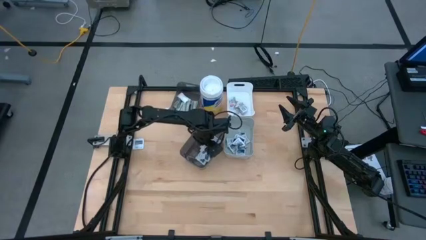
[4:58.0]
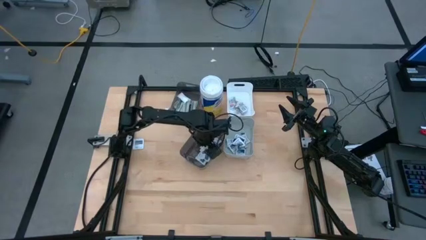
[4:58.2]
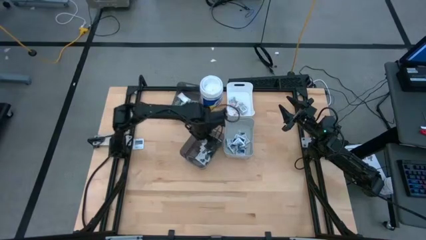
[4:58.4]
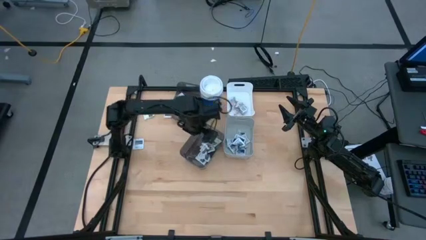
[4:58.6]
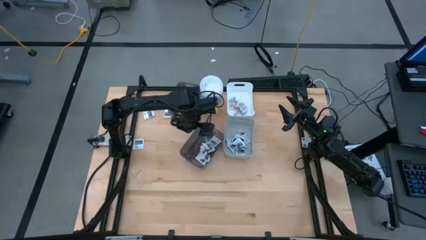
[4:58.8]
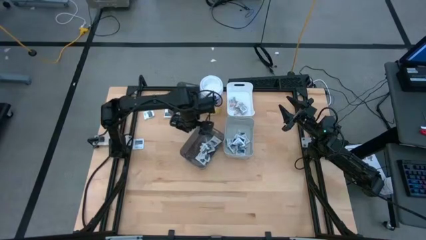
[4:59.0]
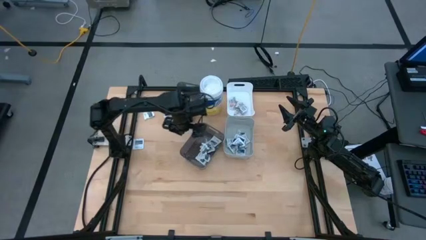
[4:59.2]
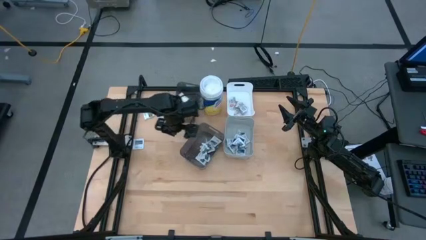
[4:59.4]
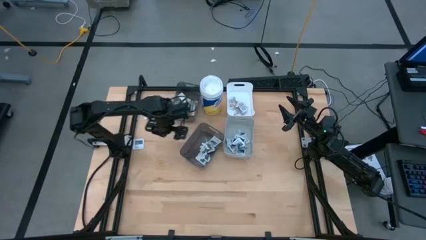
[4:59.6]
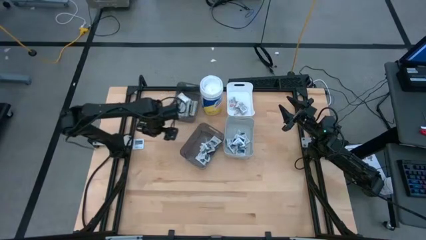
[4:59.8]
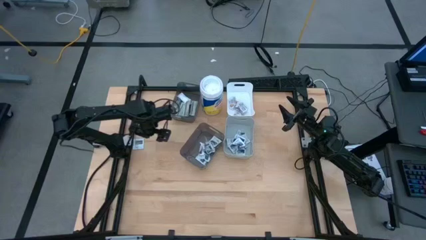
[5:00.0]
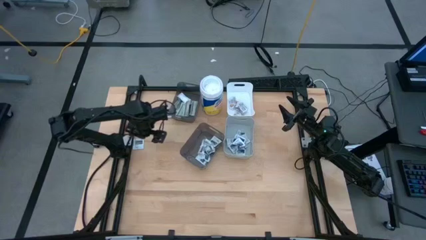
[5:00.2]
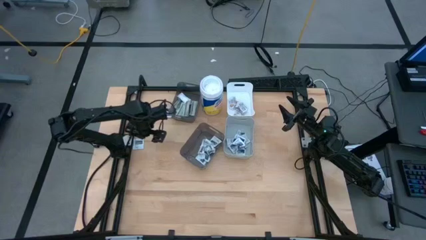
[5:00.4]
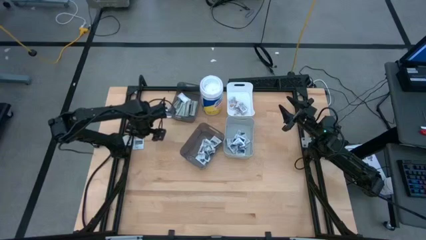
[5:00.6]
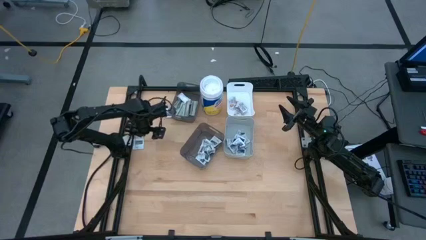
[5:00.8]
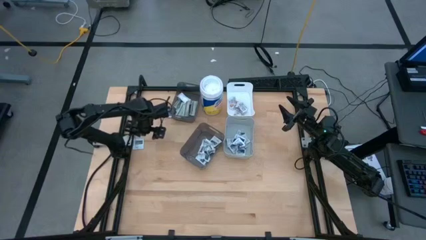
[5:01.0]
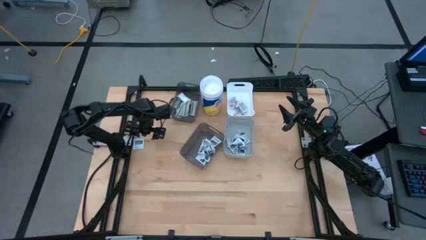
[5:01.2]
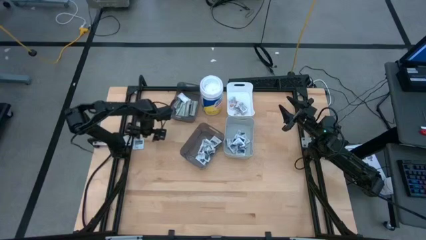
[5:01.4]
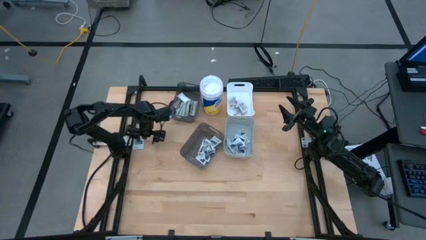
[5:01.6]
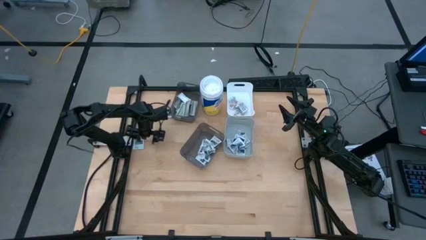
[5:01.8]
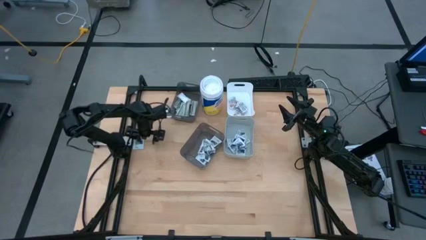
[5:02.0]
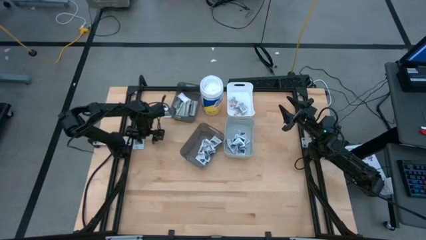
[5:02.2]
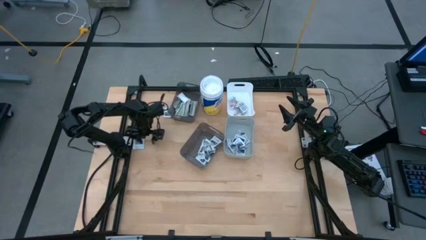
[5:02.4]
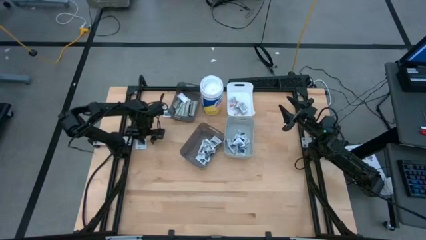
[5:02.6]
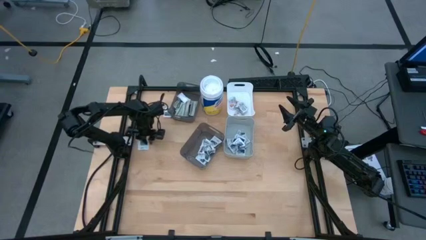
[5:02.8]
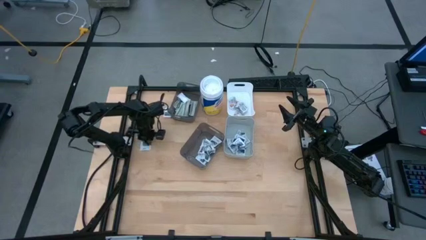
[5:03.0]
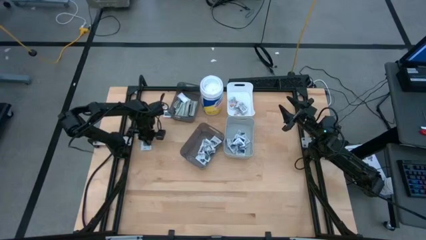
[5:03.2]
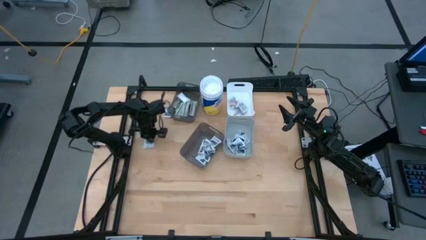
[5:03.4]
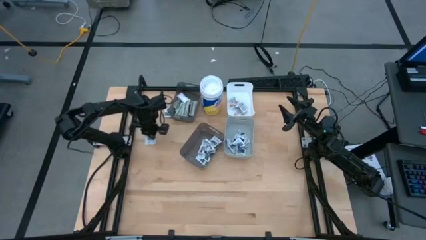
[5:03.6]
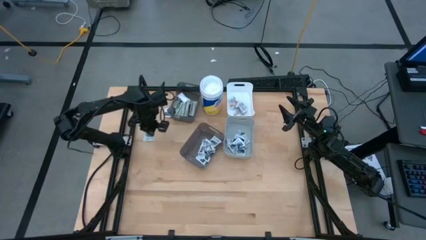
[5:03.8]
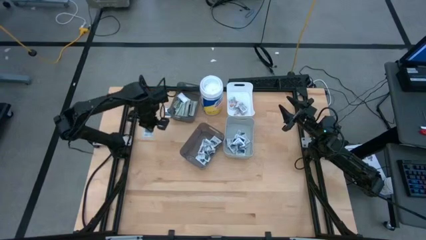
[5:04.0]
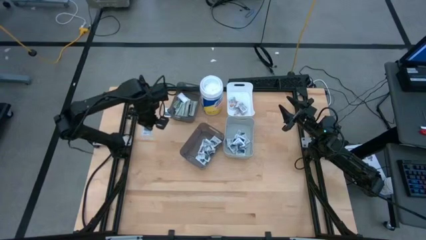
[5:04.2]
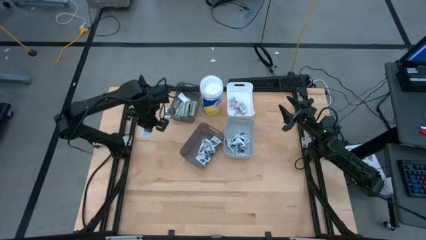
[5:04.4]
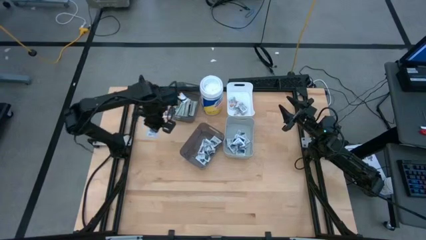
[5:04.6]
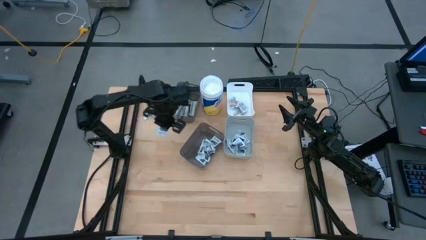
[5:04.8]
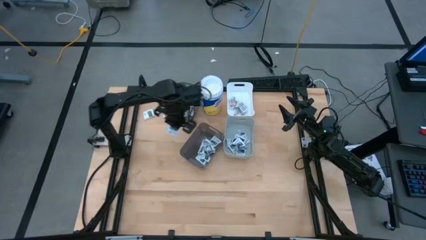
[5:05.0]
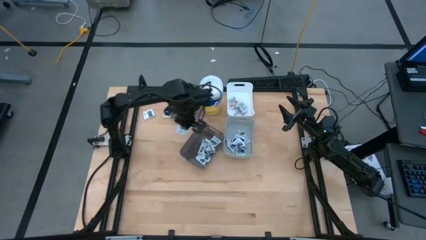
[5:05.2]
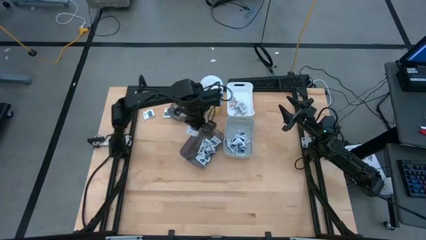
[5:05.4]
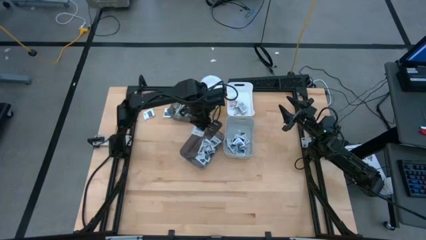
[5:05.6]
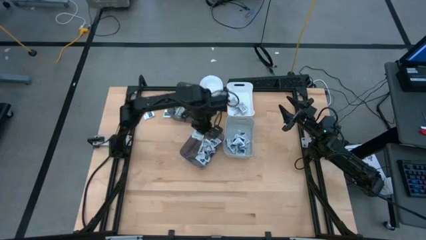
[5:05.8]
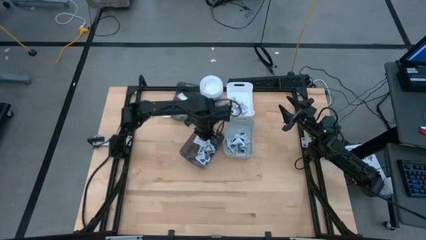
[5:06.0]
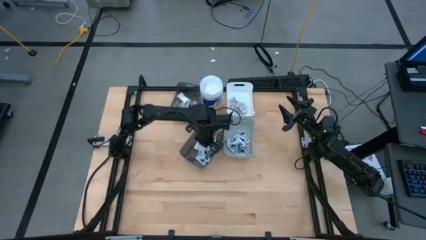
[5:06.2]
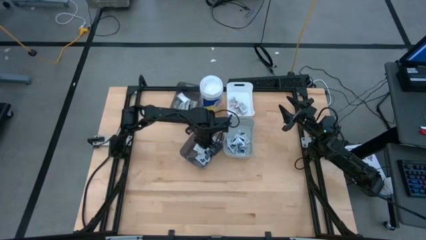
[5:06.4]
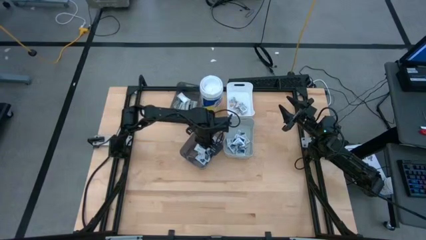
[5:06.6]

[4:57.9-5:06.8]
Task: Pick & Place First Aid Supplies
Put the bottom towelette pack into the bottom black bin

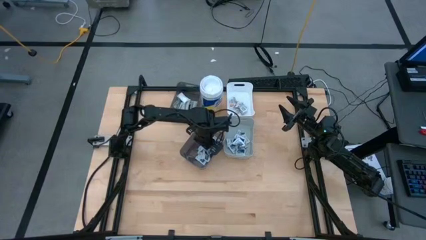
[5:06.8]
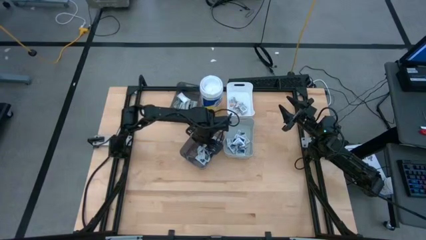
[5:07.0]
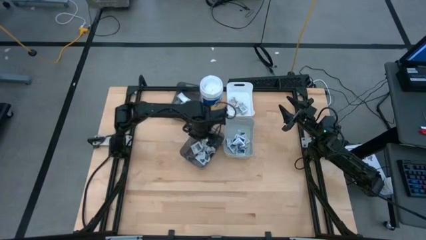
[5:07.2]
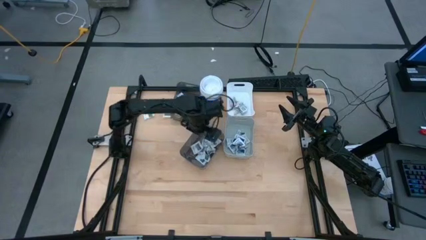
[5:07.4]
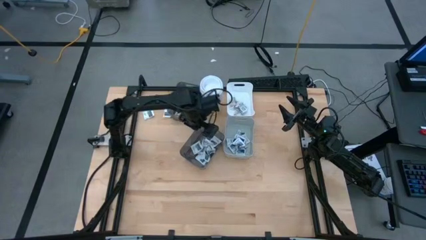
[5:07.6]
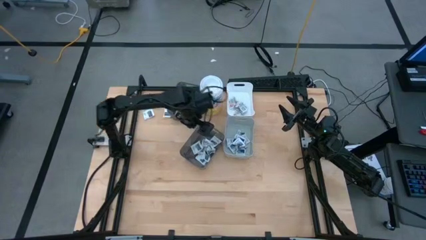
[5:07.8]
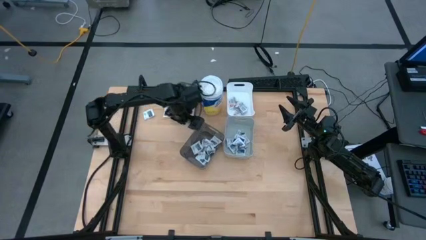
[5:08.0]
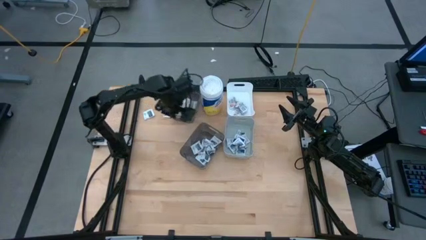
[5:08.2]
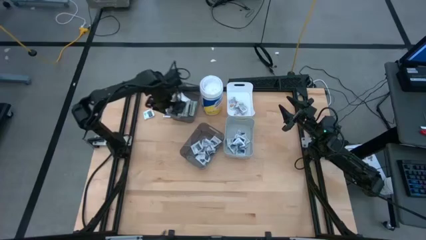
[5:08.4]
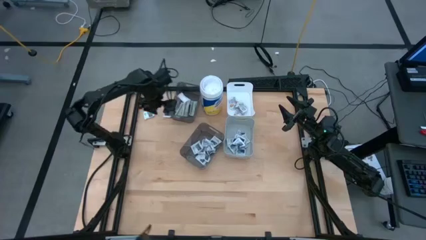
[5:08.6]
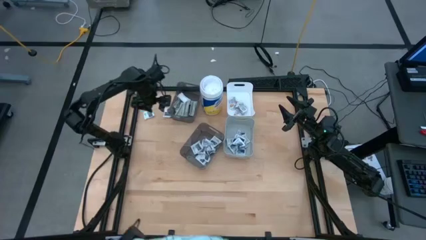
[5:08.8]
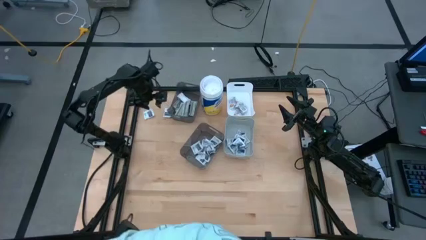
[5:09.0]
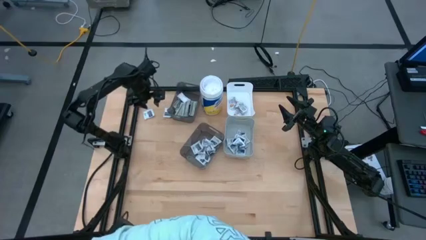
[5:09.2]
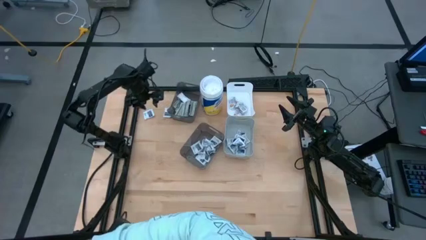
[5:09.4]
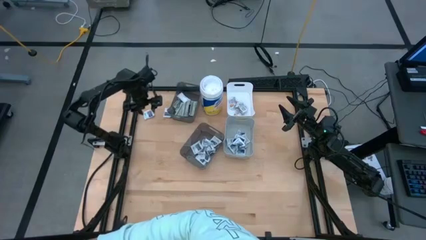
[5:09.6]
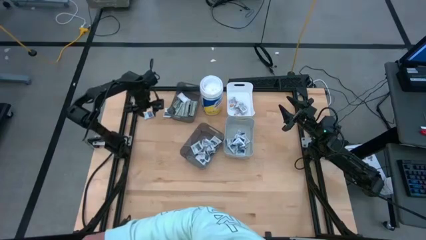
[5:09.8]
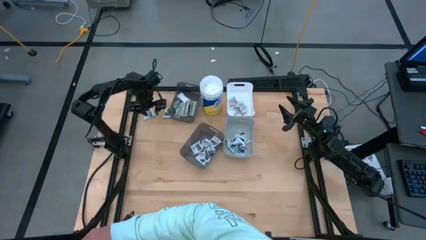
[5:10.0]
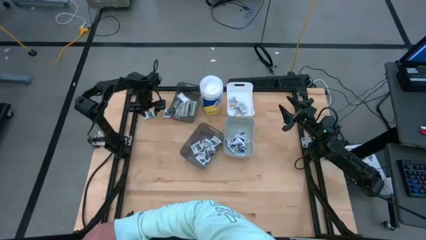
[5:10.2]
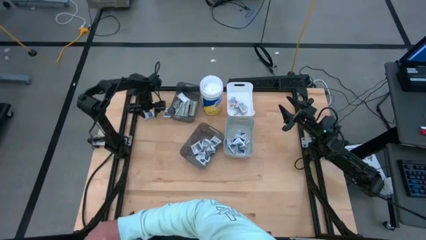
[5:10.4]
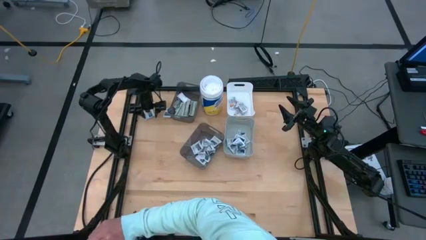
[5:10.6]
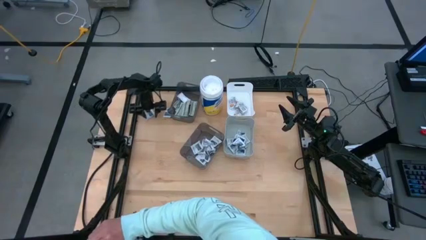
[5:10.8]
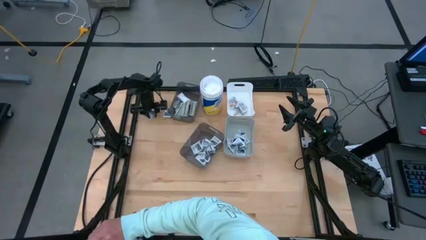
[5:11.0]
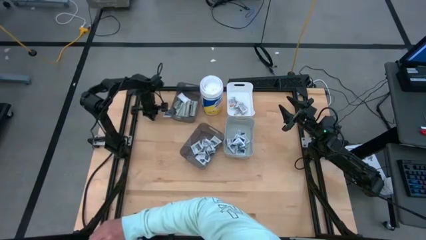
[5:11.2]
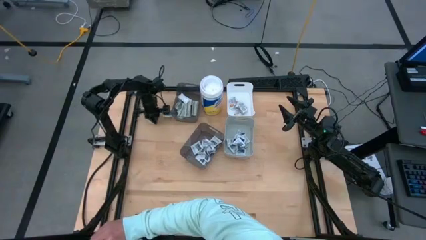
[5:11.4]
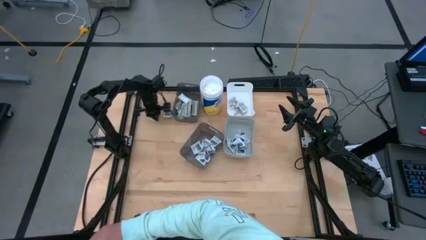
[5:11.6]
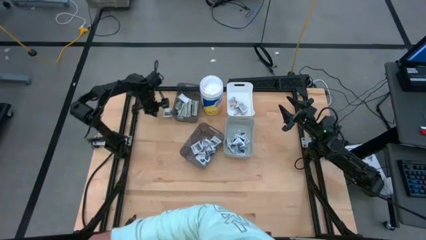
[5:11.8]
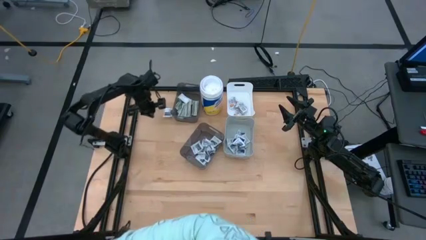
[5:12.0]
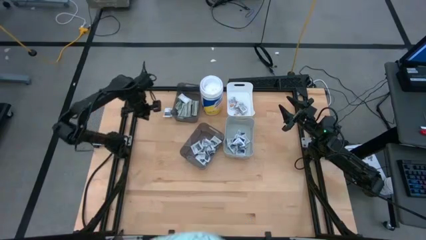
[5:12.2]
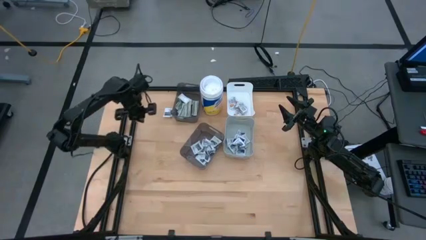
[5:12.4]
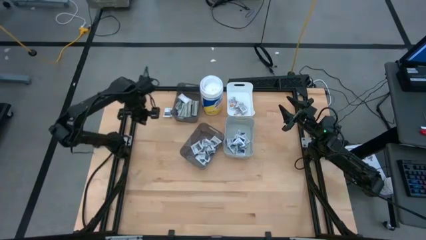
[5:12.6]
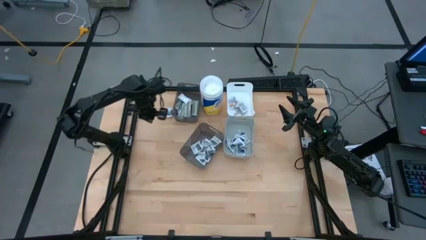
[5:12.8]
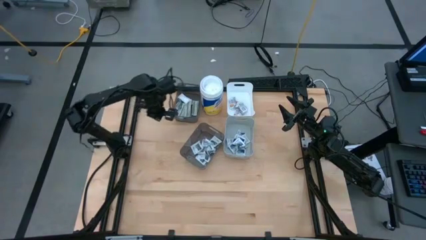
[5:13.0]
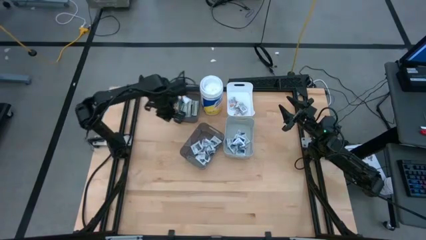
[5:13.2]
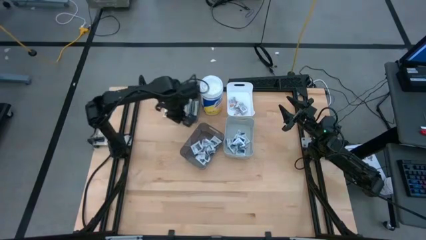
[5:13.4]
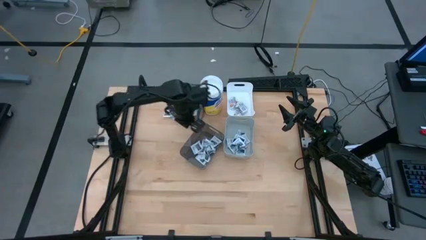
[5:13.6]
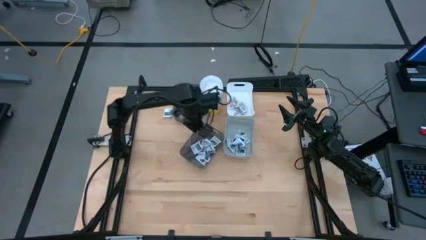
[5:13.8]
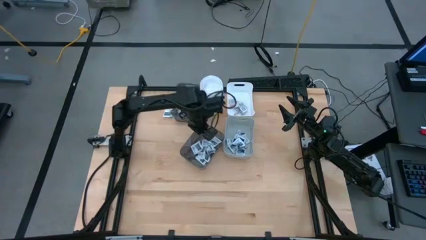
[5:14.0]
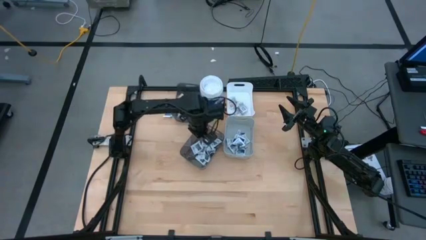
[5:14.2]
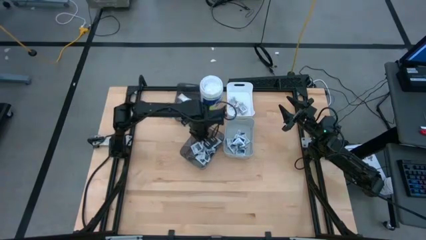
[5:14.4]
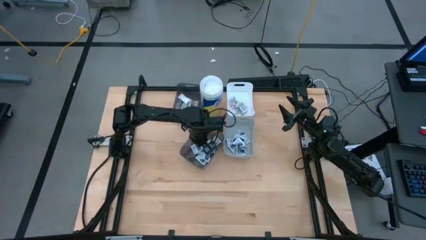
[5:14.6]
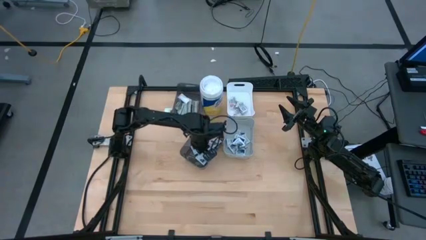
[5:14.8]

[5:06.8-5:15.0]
Put the left towelette pack into the bottom black bin
